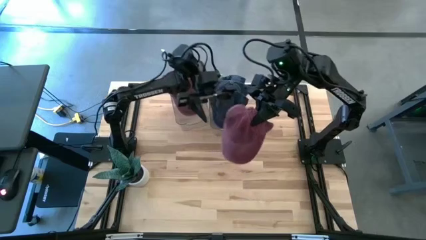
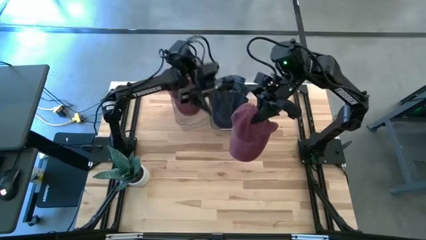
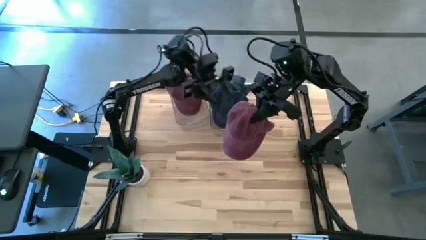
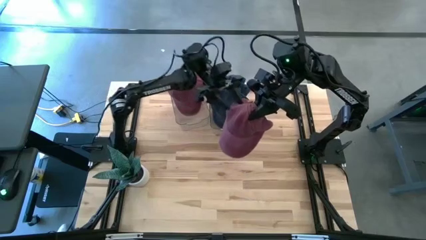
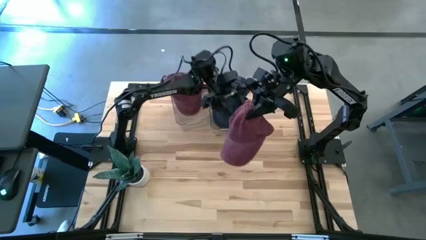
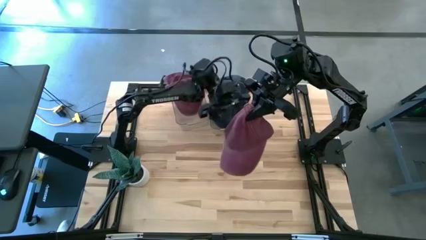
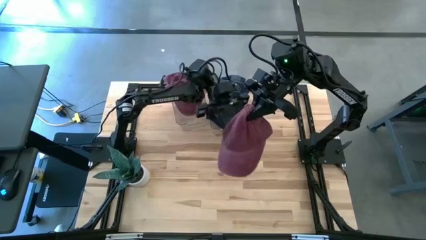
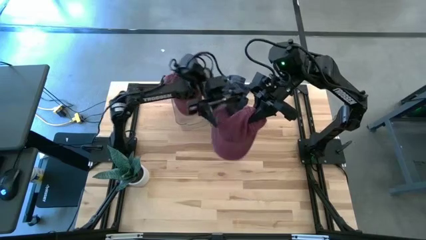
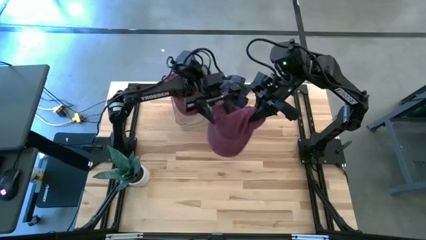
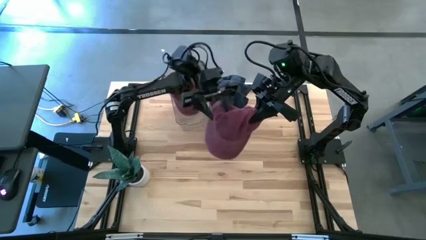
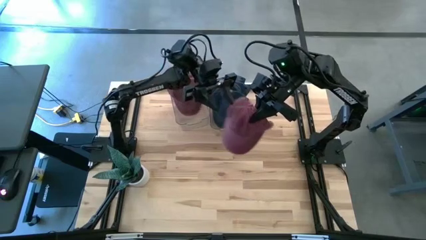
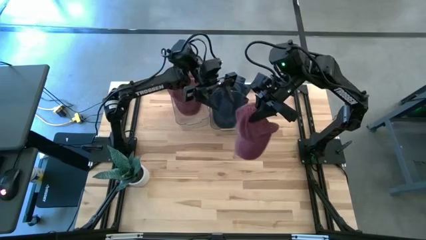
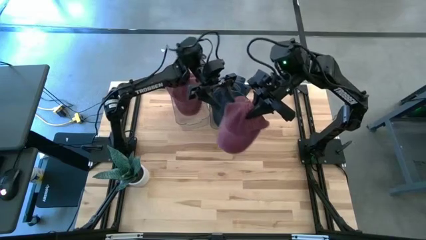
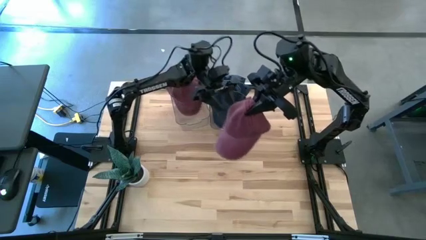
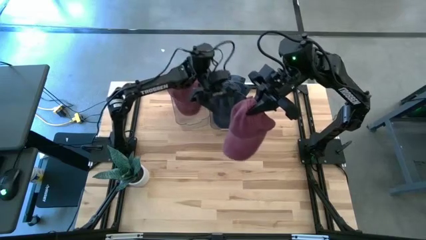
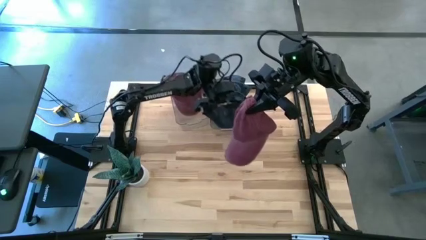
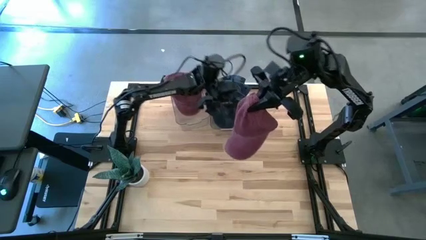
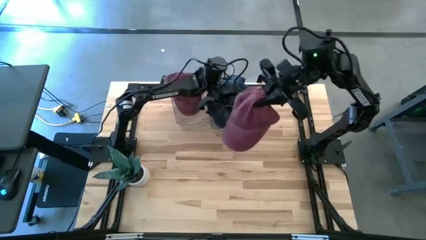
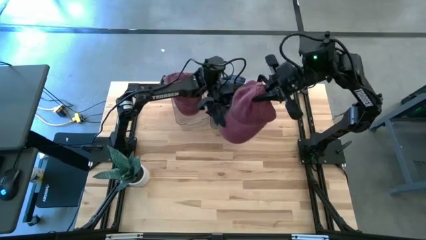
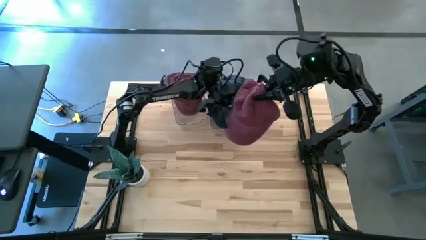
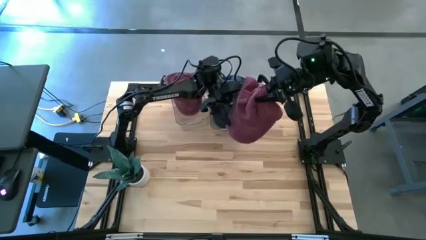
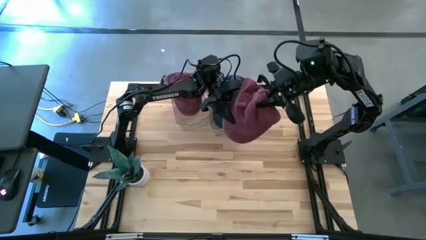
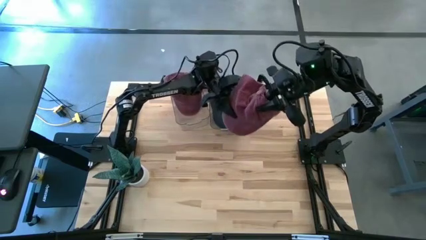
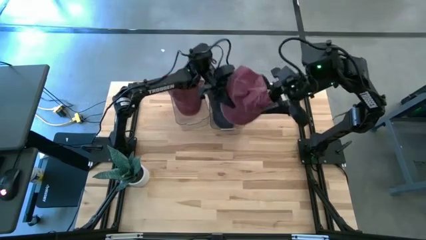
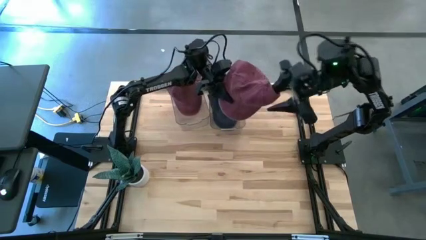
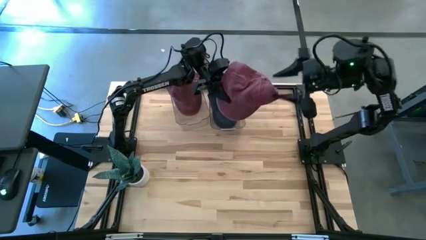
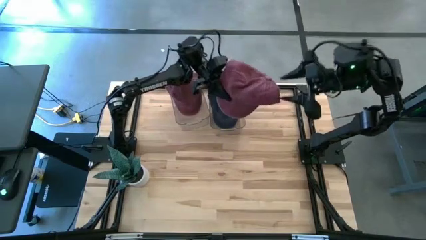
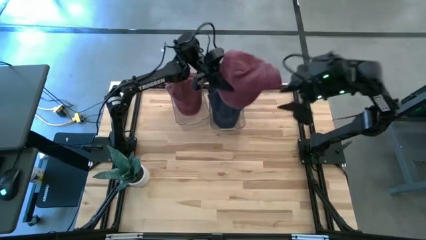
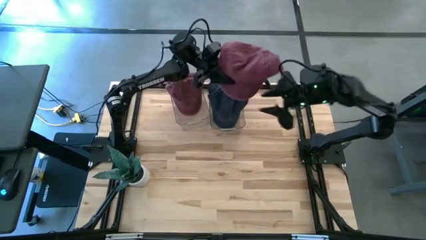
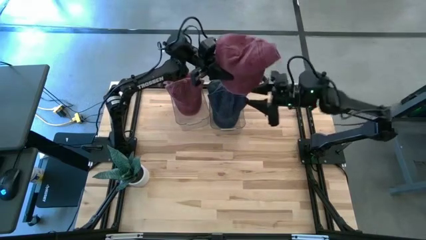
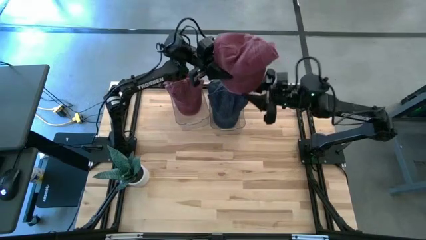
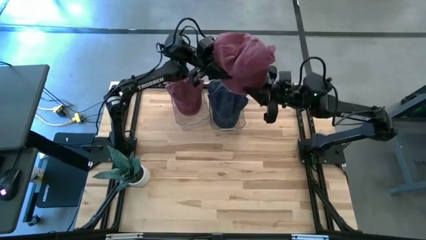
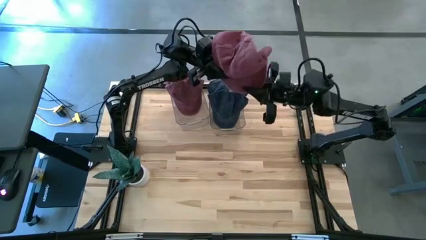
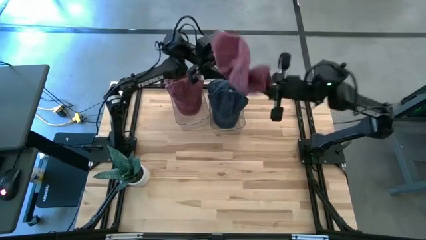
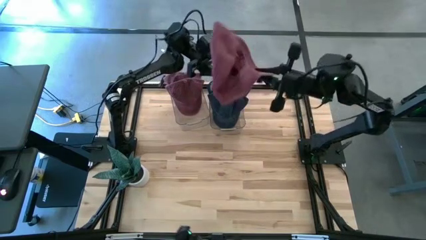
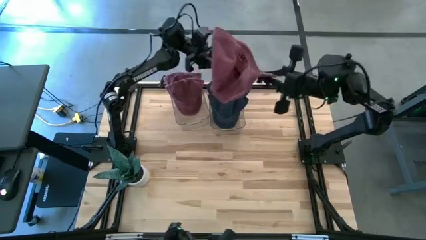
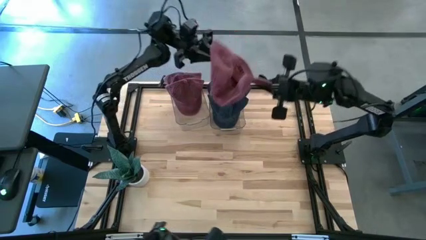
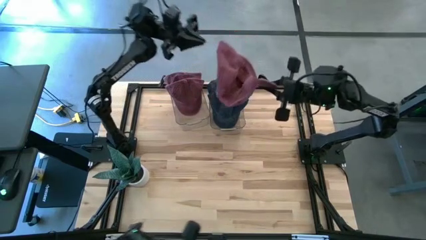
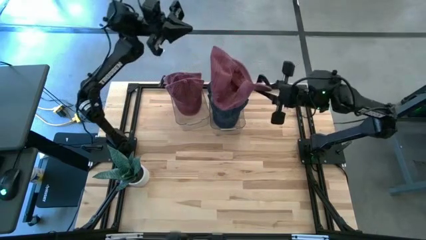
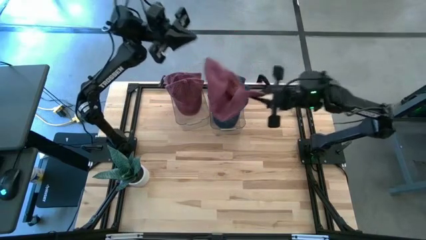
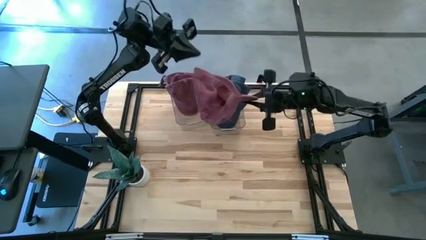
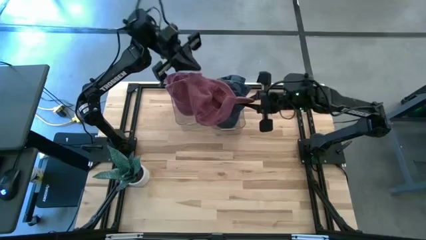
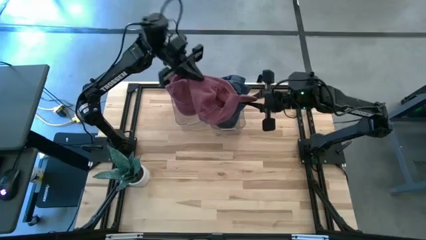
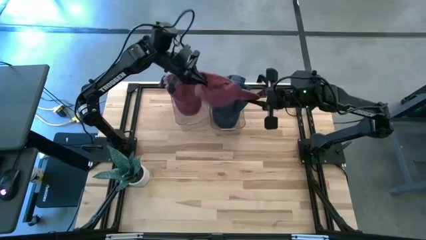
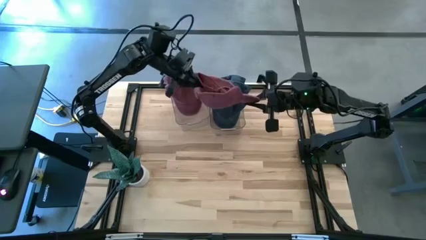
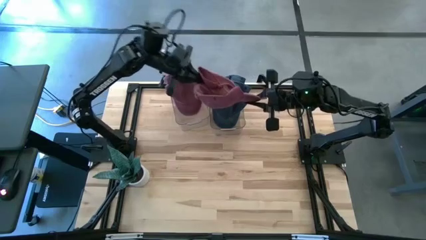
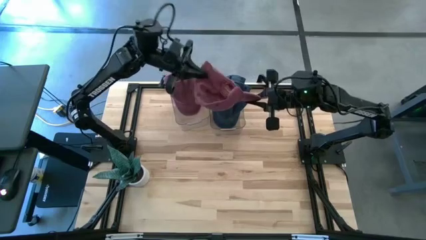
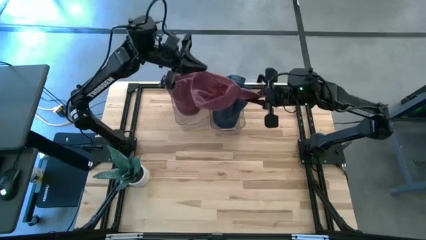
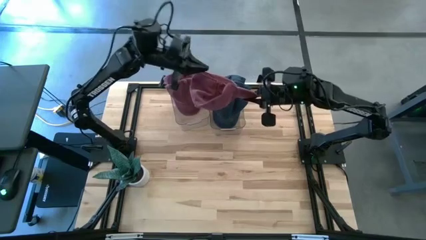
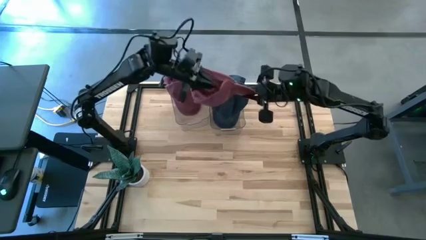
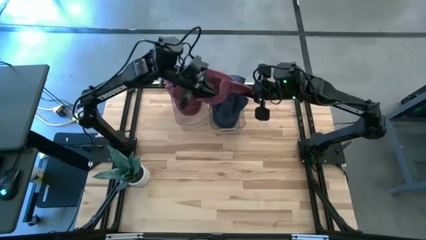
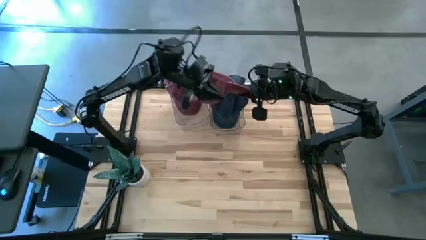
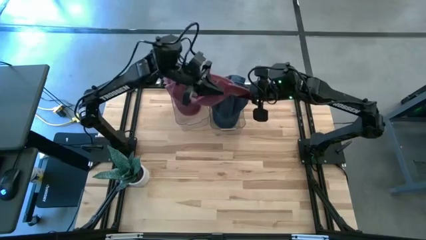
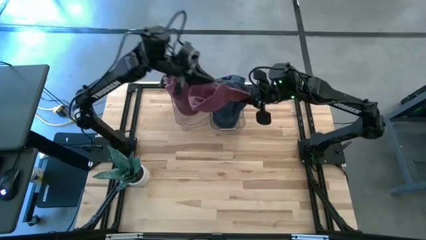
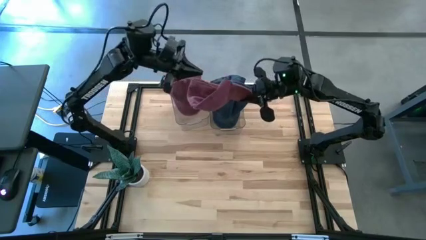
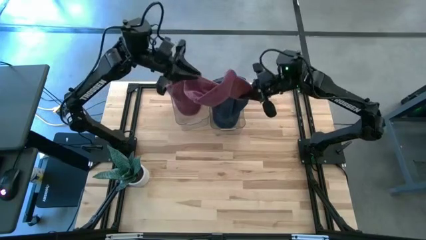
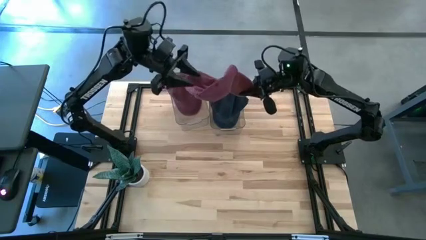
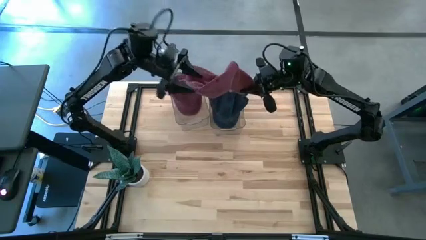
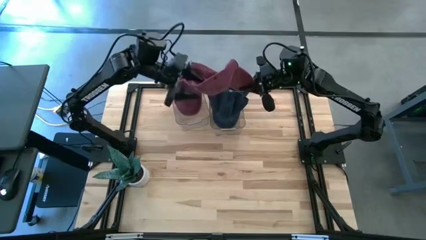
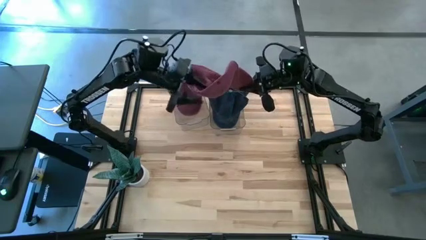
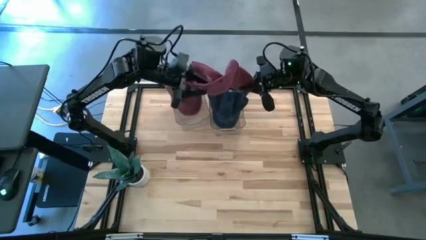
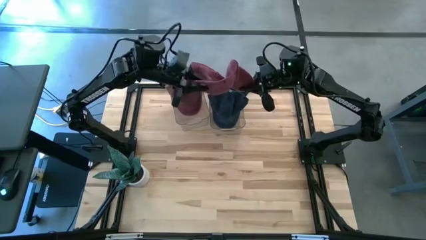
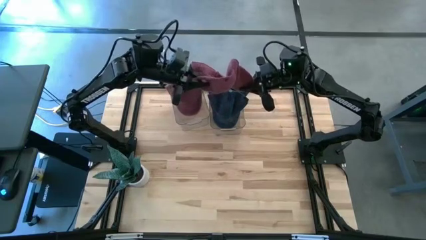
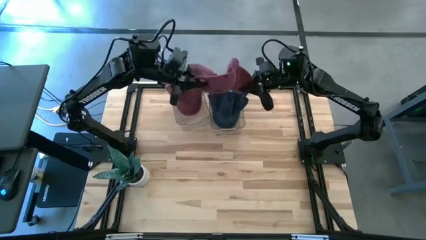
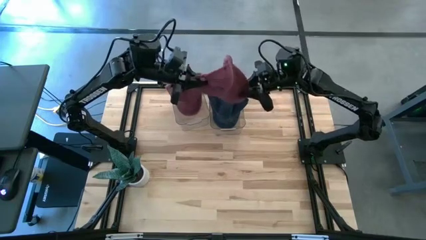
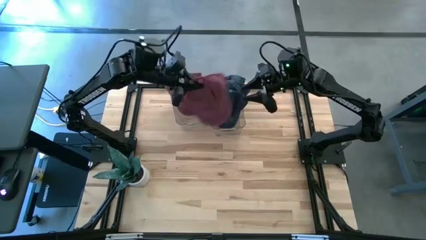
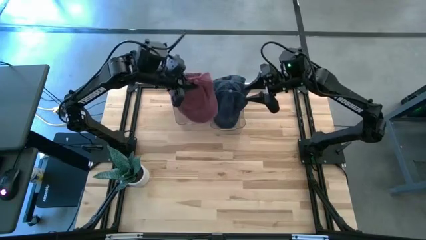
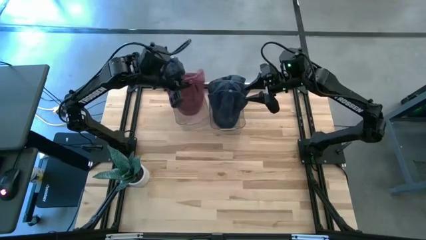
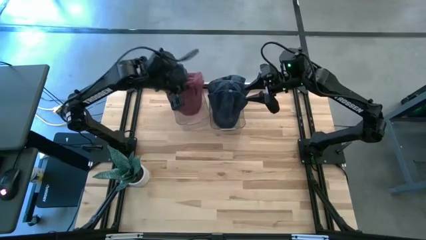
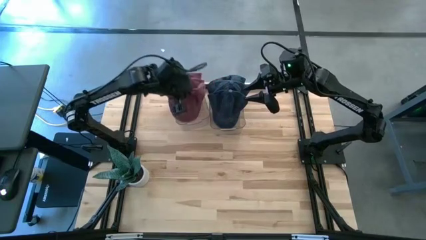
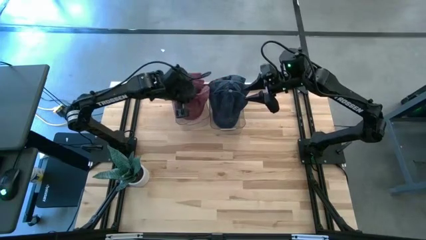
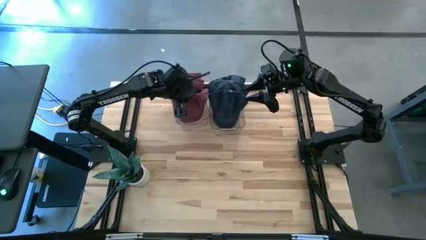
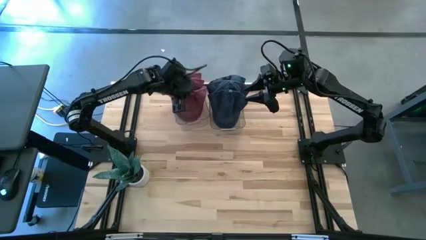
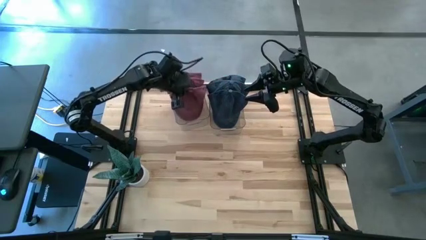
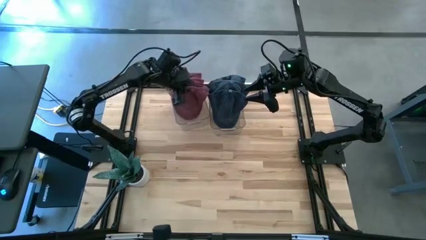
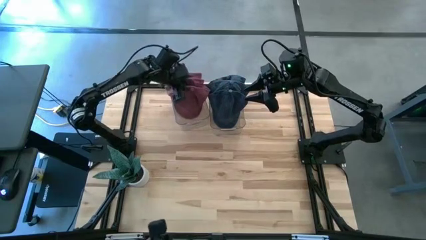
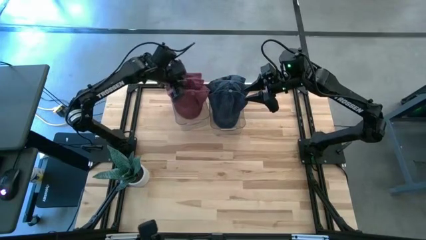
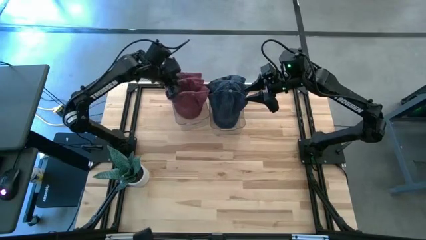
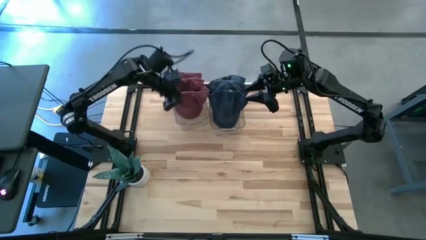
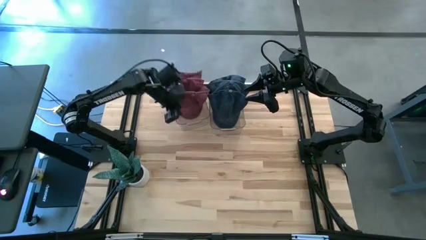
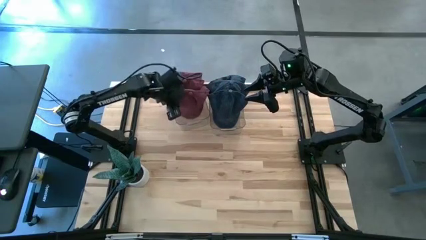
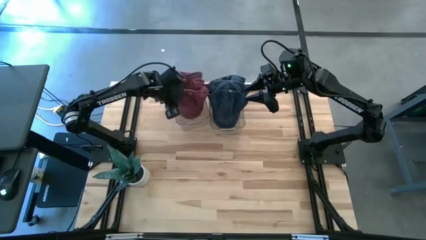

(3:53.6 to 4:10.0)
Task: Pick & Place hat
Put the red cap into the left bin

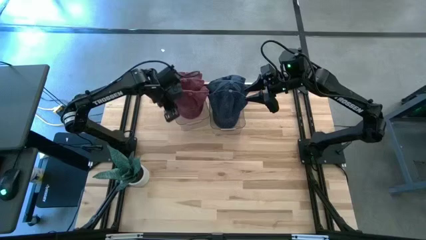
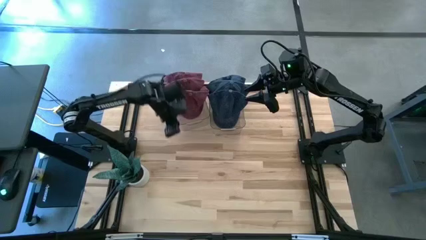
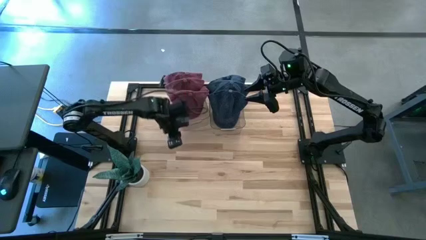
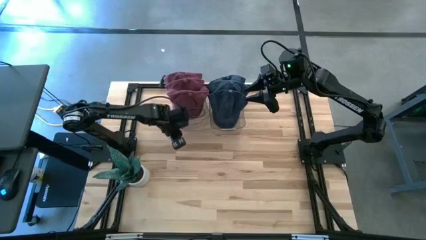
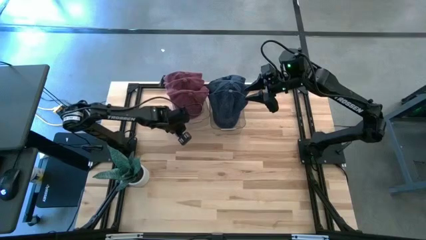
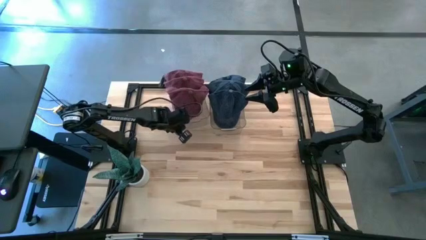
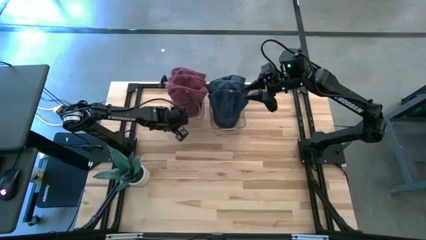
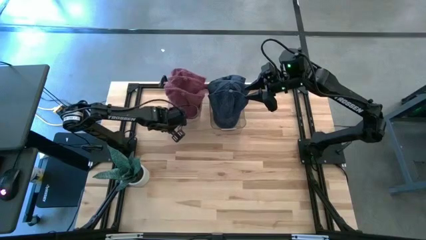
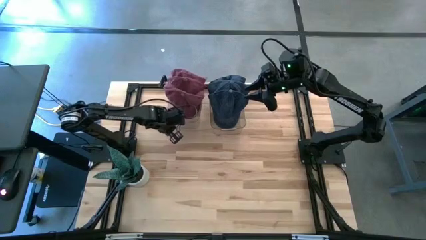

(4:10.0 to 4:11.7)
Adjust the left bin
